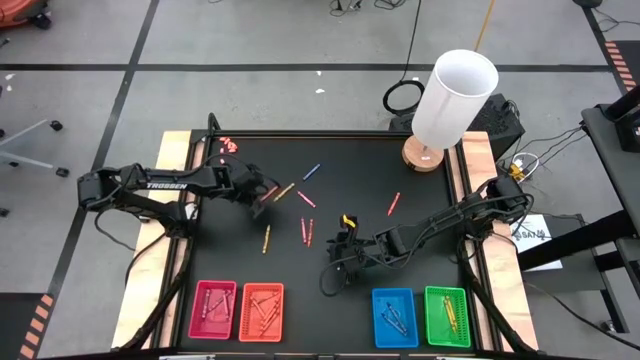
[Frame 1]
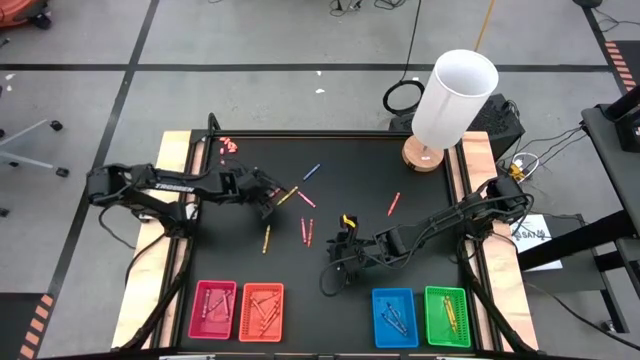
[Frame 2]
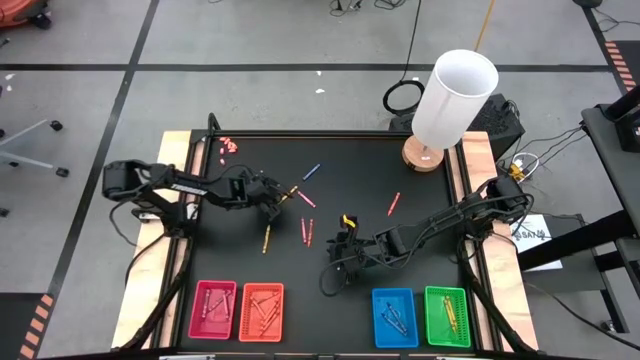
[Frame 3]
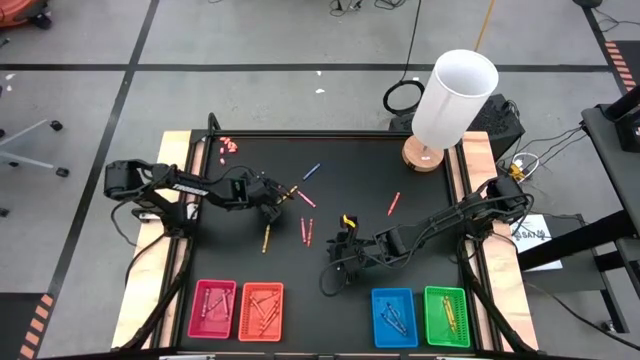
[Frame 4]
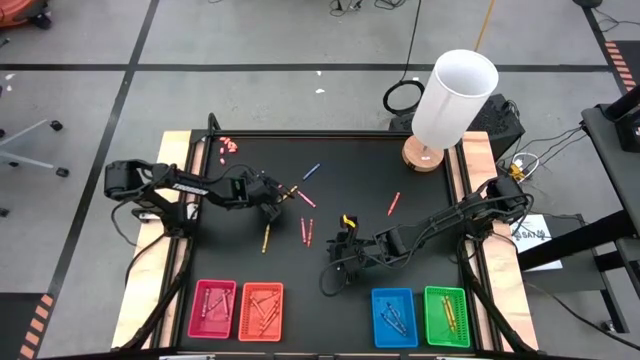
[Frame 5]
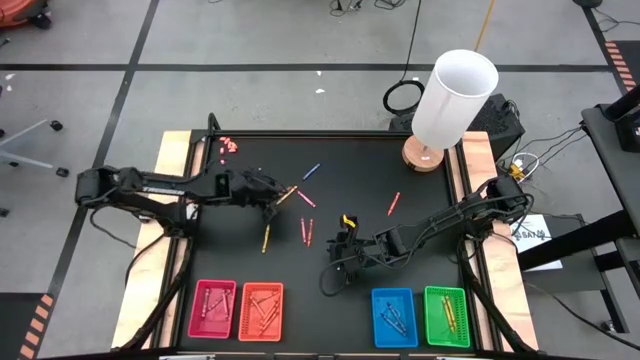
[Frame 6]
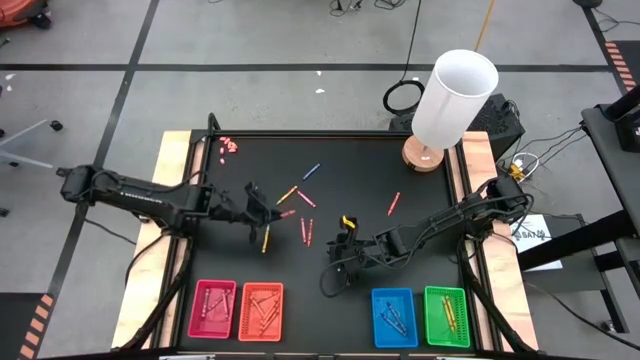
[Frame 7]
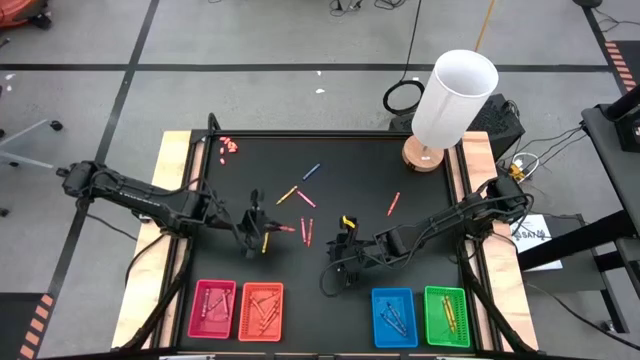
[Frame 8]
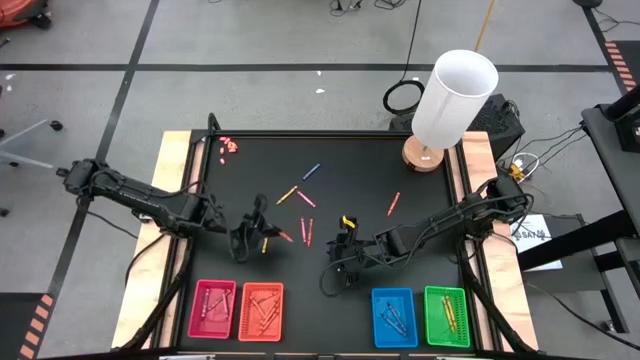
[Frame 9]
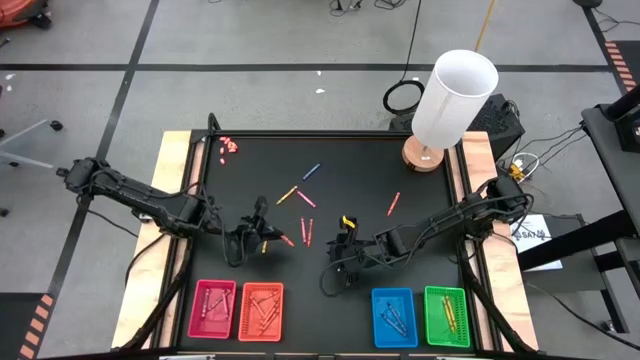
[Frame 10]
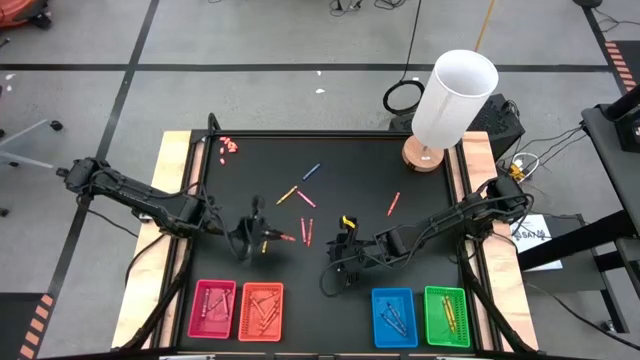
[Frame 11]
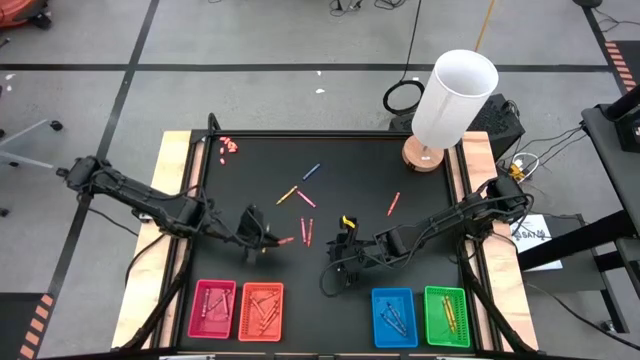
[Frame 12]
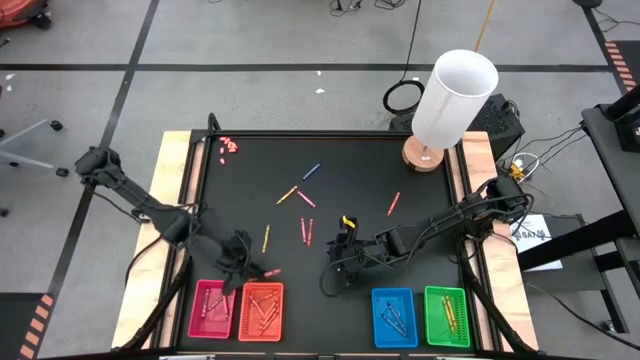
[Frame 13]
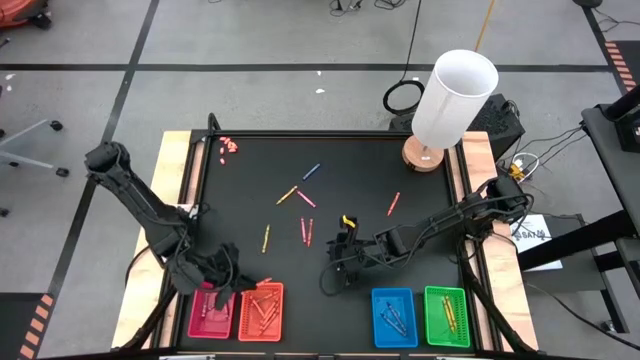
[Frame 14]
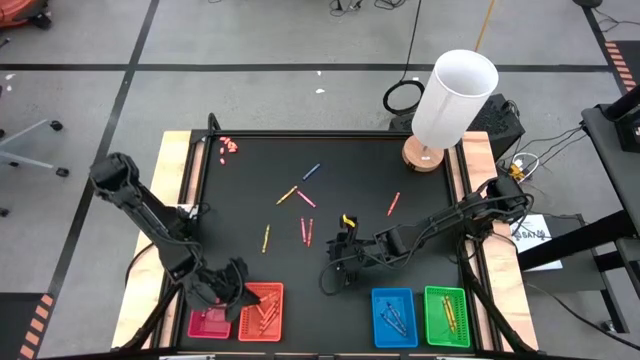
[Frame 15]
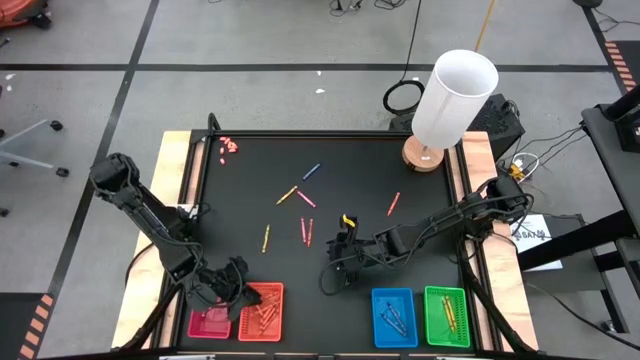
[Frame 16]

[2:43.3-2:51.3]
Task: Sort crayons
Put the orange crayon into the orange bin

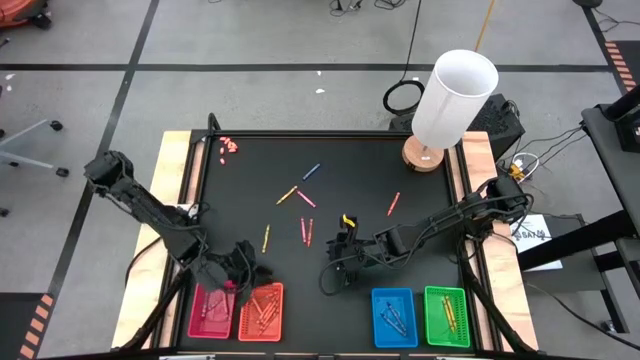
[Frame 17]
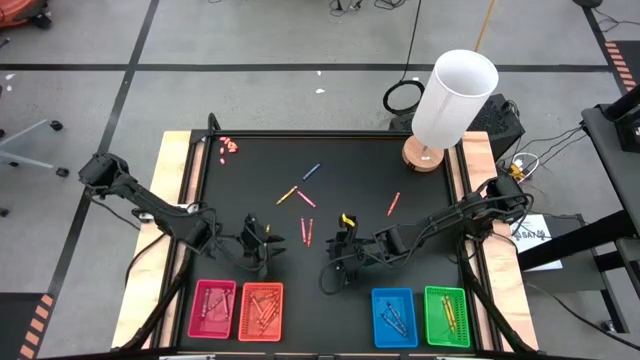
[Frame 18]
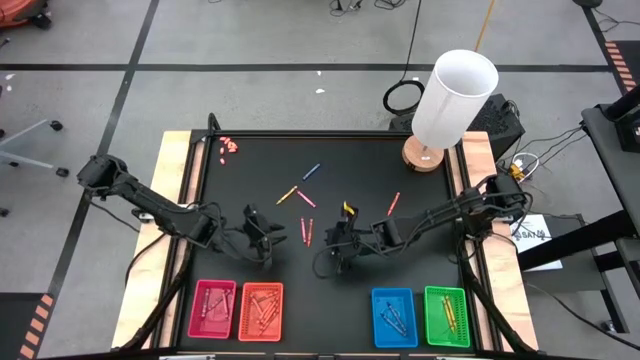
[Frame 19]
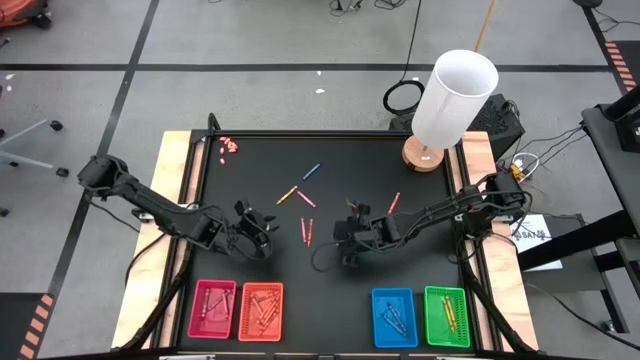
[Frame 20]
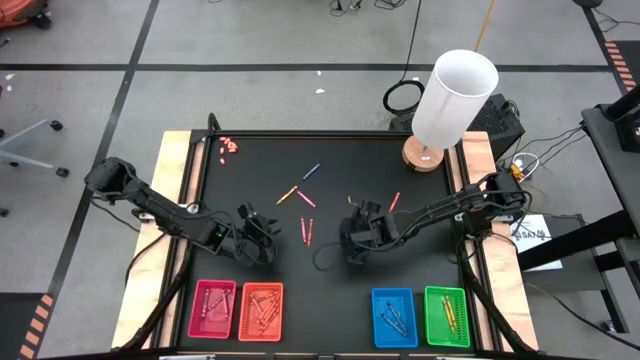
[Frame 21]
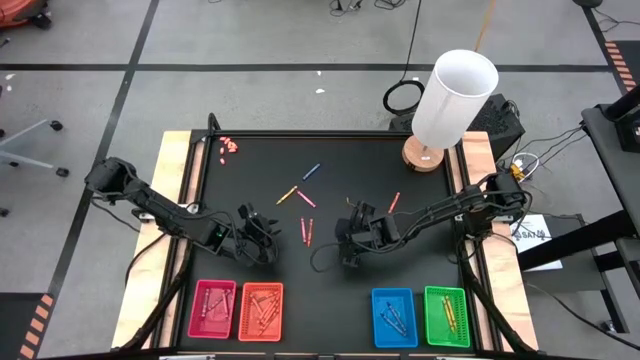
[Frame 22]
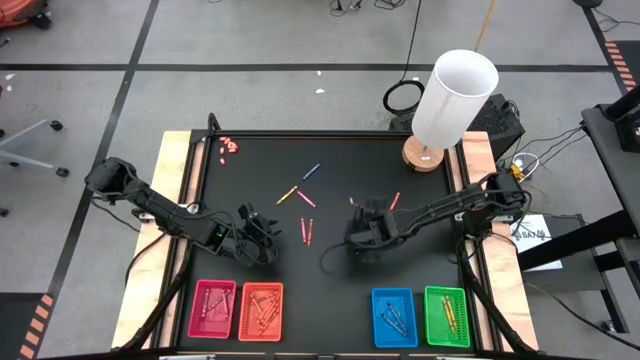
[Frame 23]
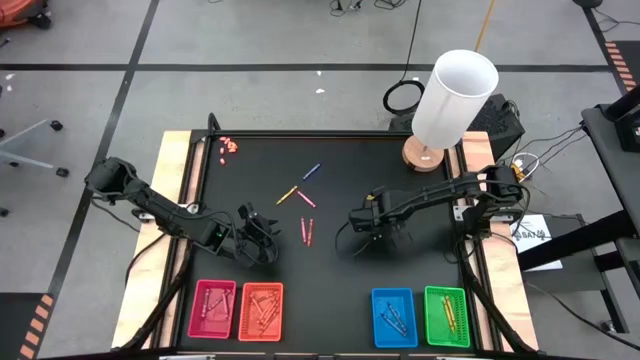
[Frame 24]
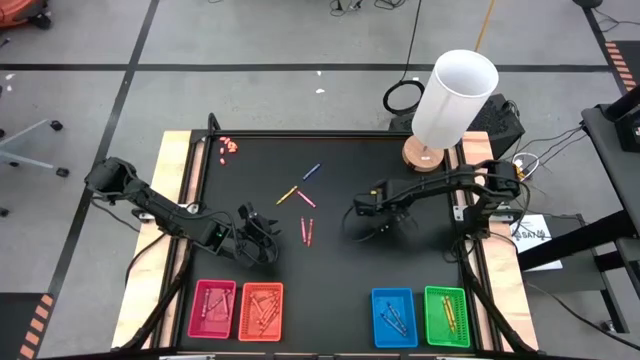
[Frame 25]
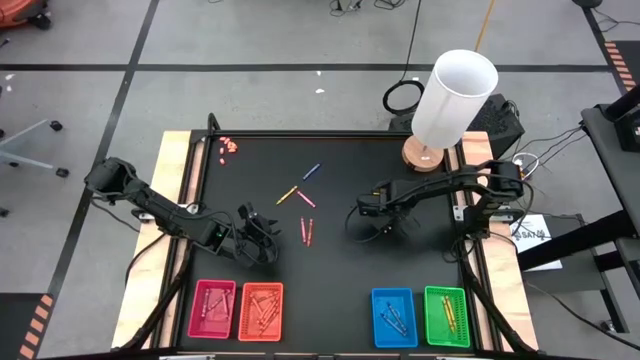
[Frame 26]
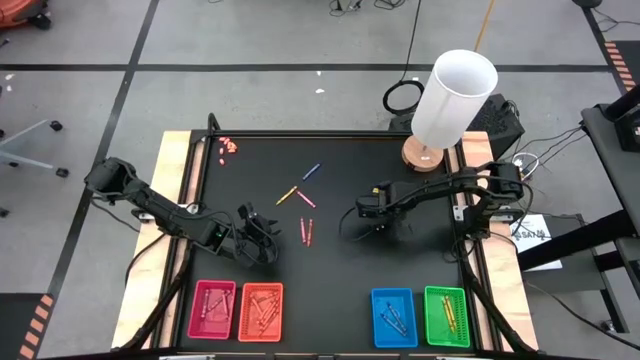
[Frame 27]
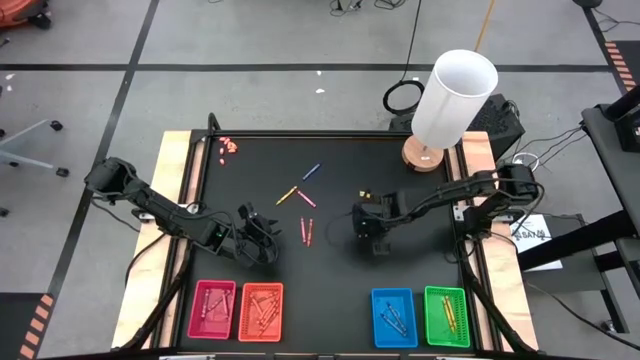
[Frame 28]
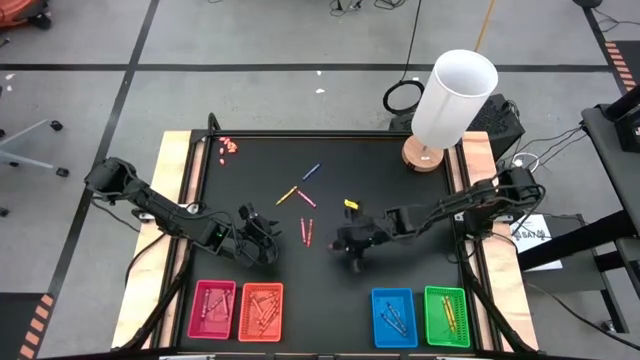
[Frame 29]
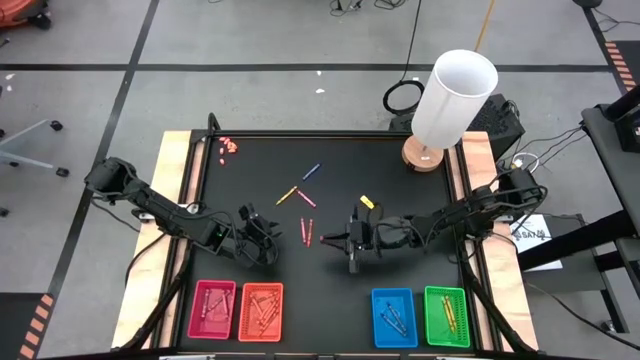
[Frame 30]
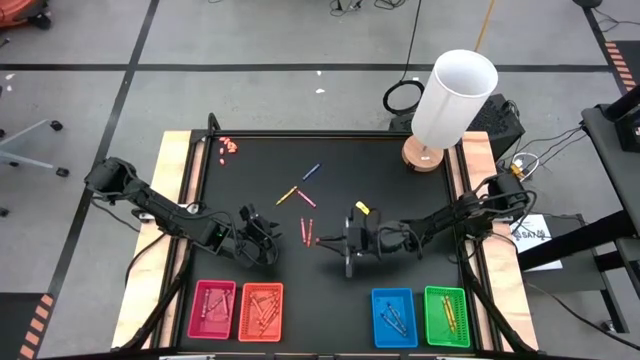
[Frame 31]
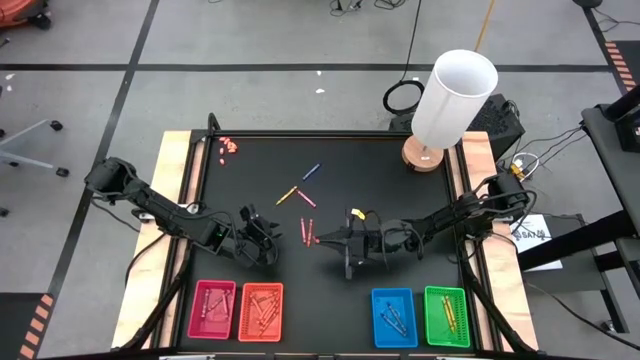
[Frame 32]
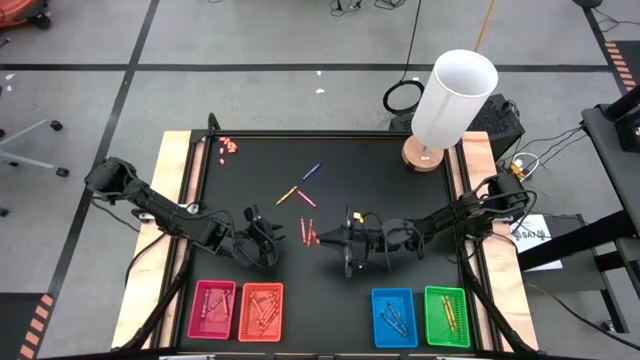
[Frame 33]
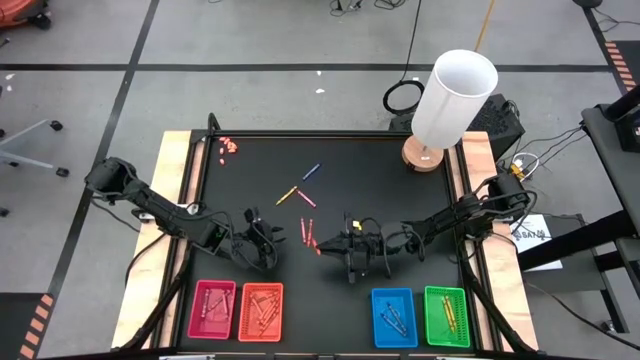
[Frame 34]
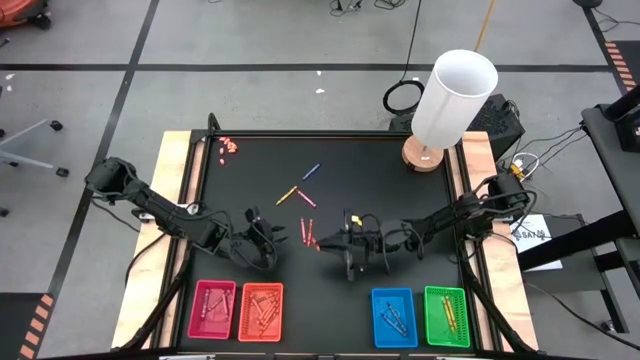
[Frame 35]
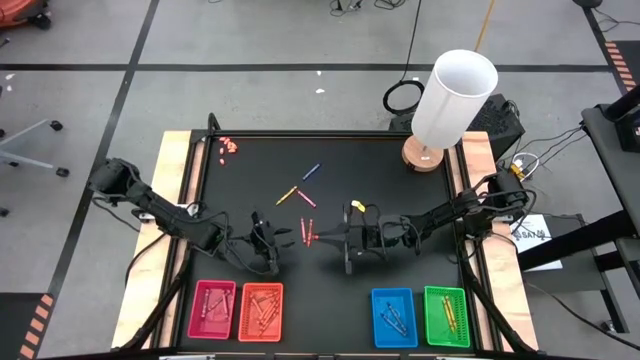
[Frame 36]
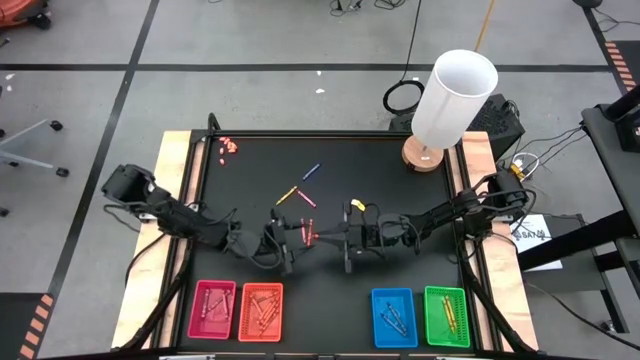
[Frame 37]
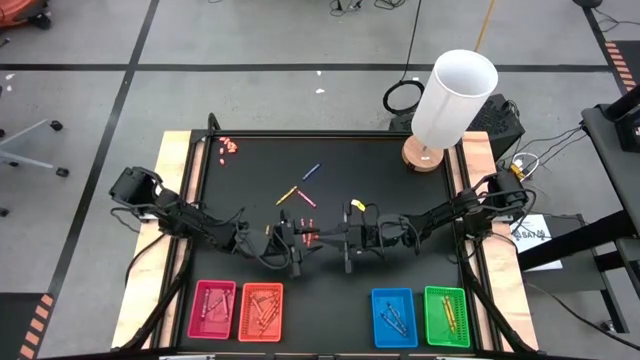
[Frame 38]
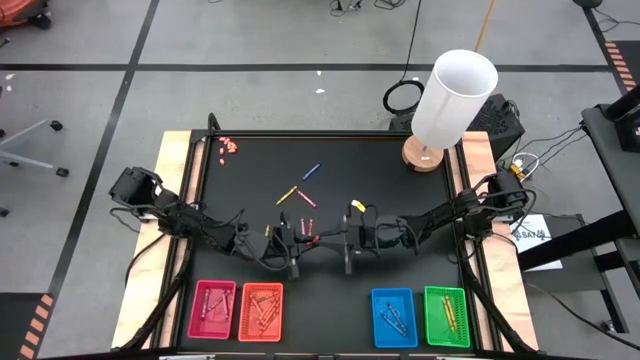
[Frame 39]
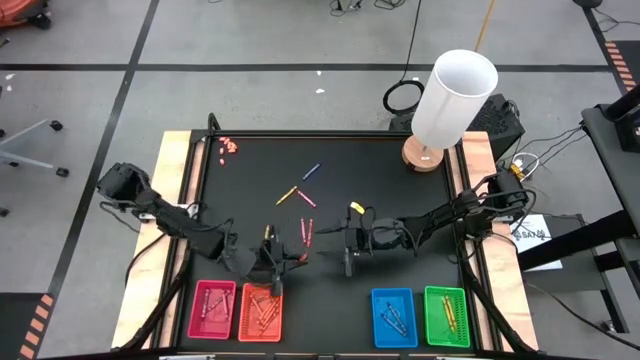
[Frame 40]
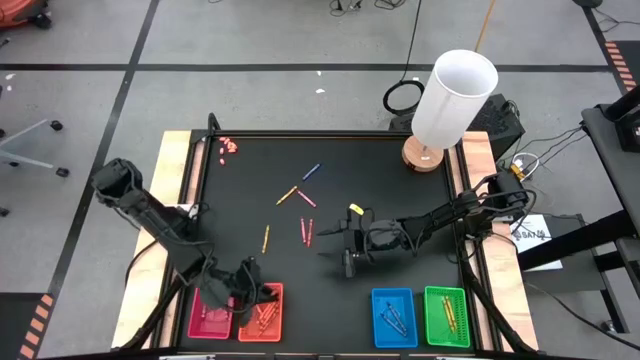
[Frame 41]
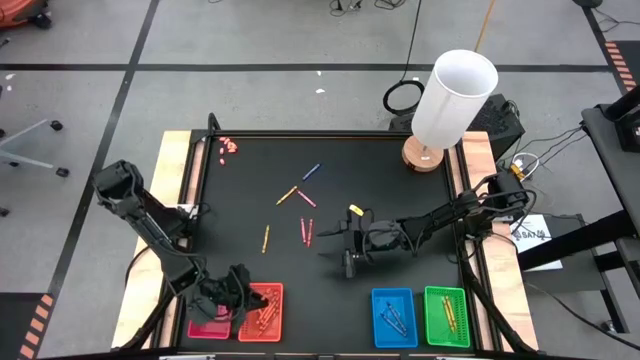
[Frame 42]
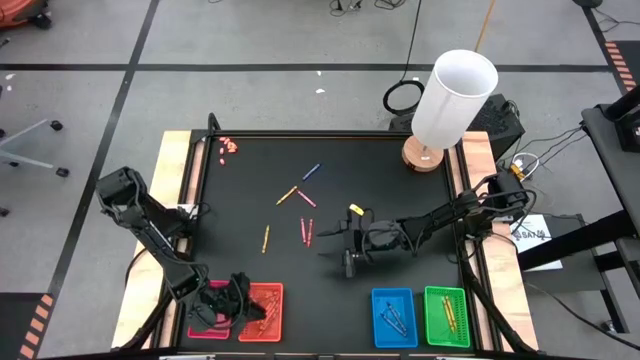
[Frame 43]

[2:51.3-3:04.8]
Put the orange crayon into the orange bin

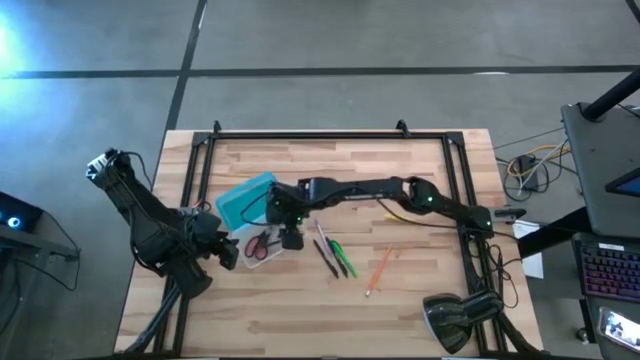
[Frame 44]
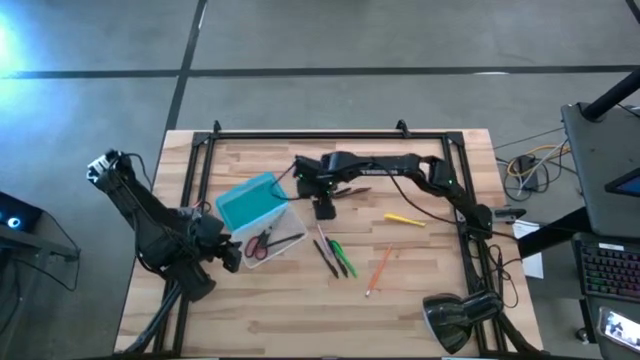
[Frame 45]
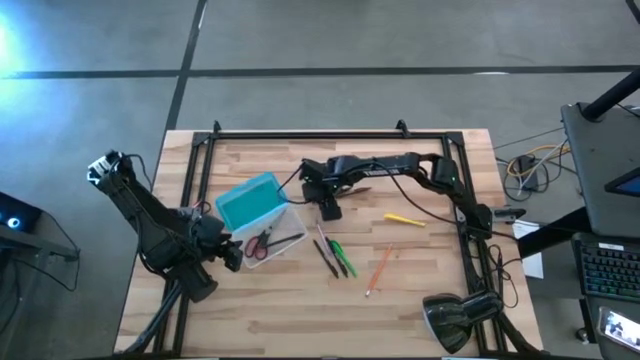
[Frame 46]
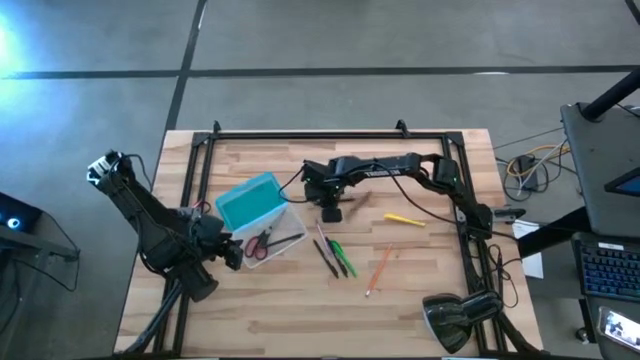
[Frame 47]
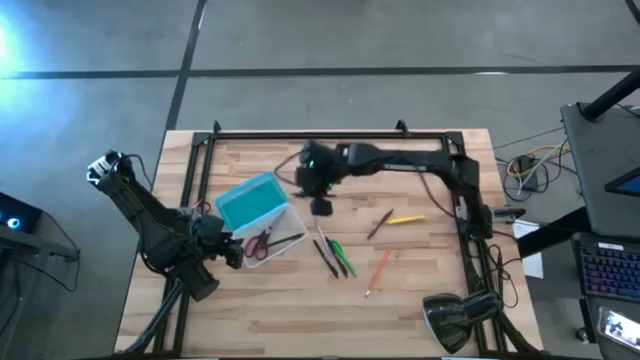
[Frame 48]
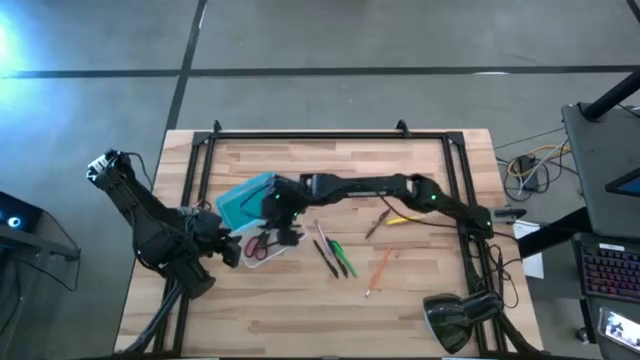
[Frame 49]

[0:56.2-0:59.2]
Task: Pick & place school supplies into a supply box
Put the black pen into the blue supply box
